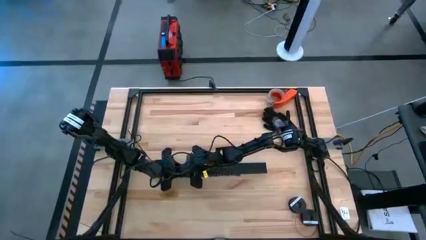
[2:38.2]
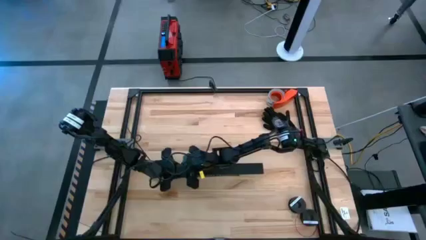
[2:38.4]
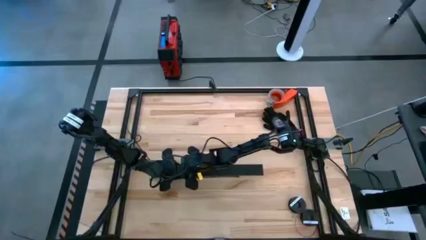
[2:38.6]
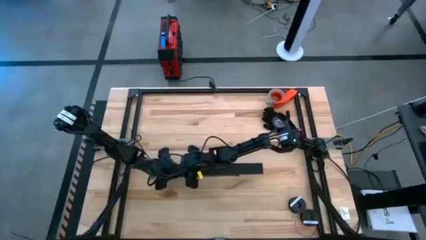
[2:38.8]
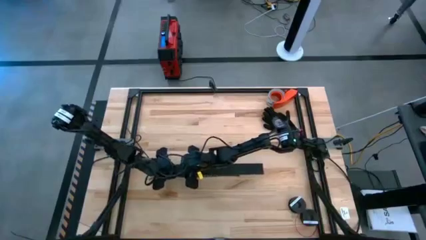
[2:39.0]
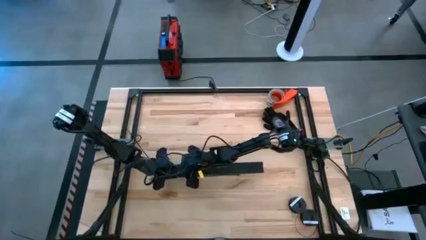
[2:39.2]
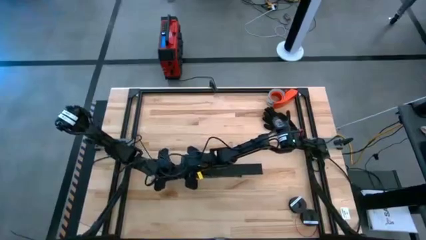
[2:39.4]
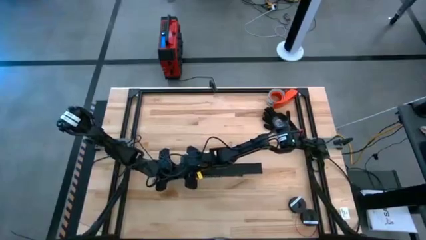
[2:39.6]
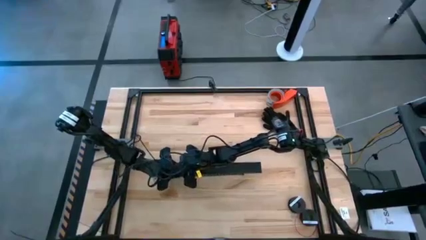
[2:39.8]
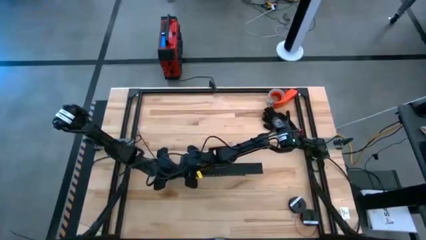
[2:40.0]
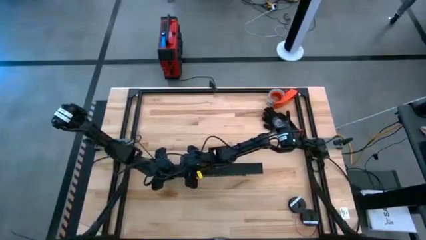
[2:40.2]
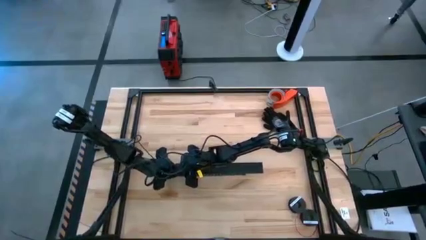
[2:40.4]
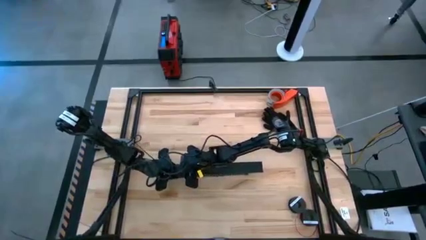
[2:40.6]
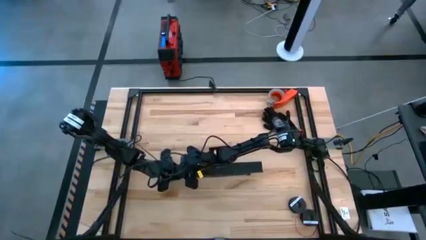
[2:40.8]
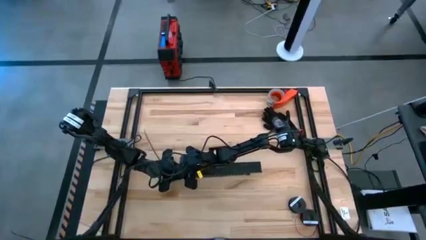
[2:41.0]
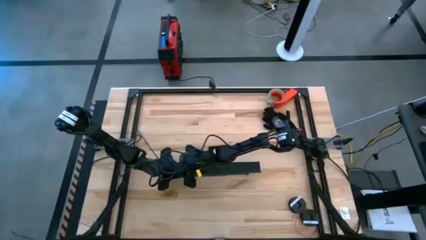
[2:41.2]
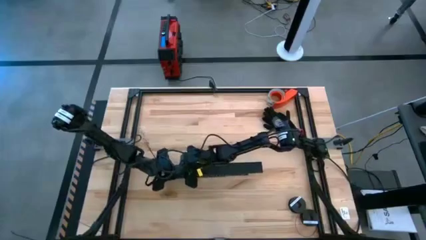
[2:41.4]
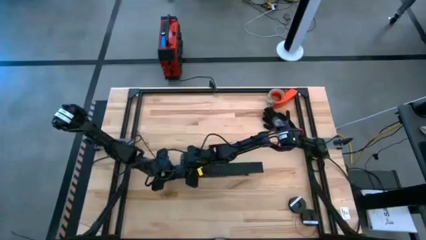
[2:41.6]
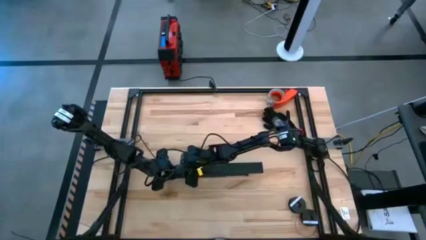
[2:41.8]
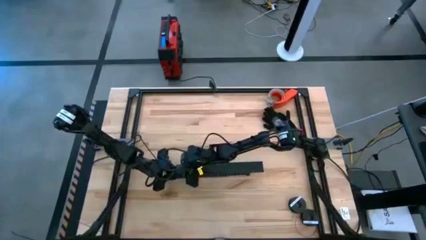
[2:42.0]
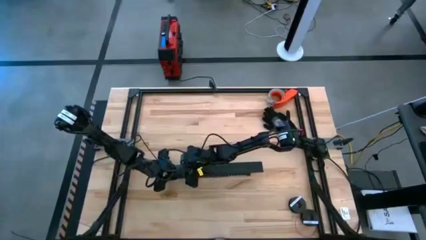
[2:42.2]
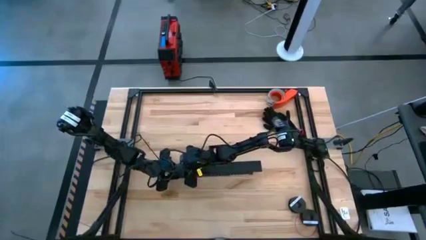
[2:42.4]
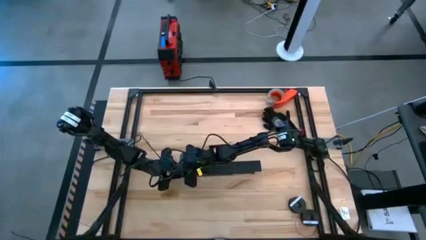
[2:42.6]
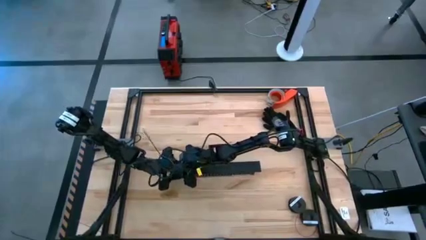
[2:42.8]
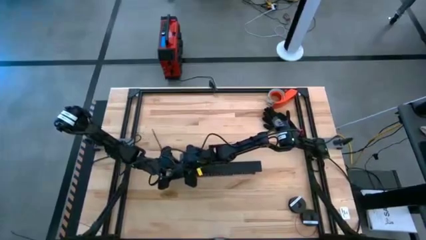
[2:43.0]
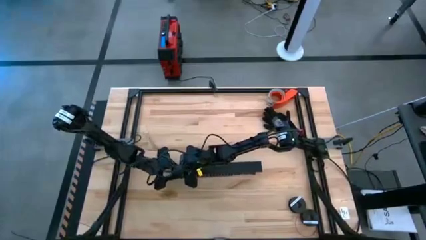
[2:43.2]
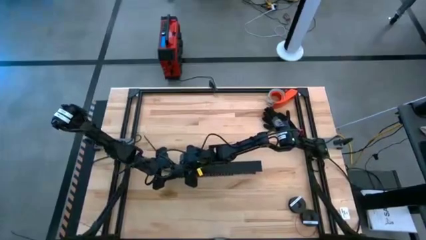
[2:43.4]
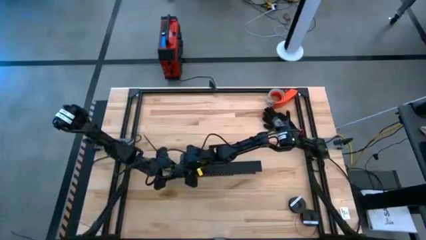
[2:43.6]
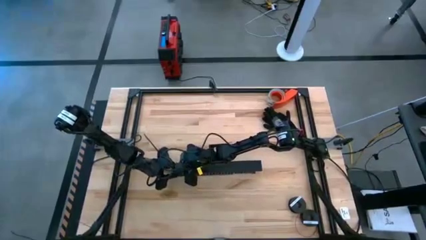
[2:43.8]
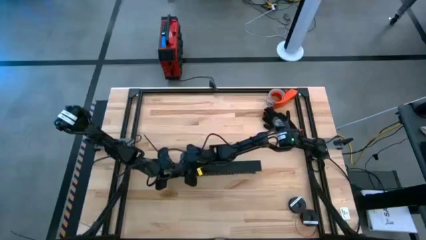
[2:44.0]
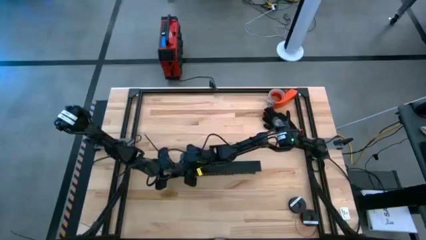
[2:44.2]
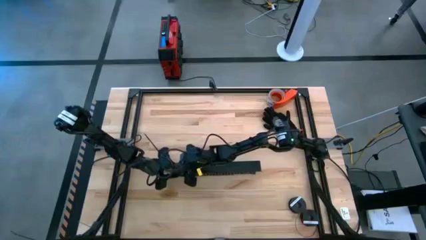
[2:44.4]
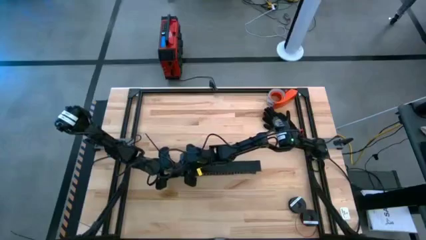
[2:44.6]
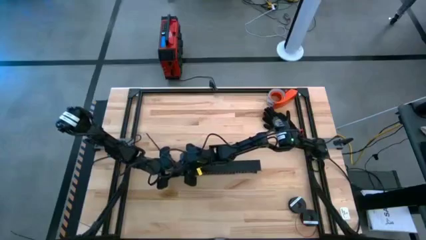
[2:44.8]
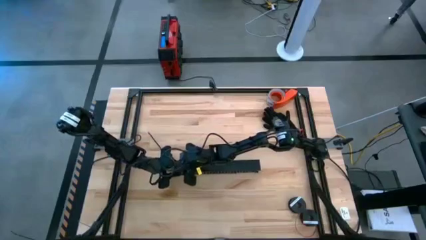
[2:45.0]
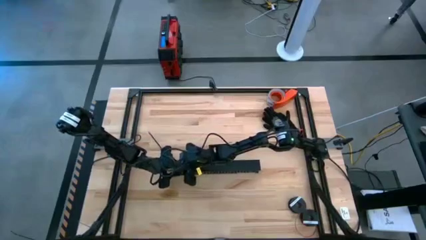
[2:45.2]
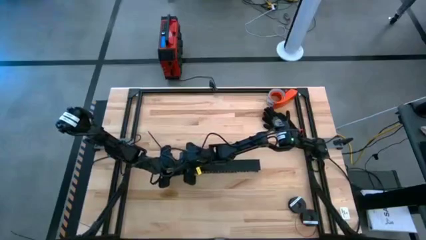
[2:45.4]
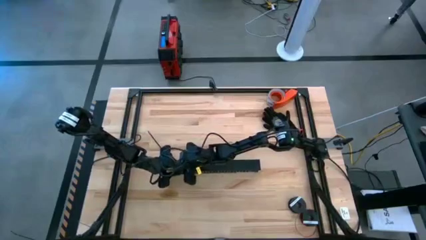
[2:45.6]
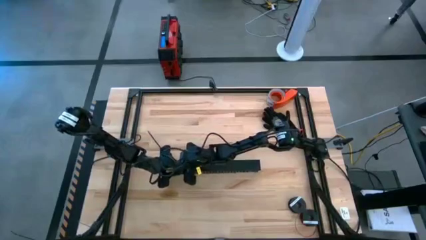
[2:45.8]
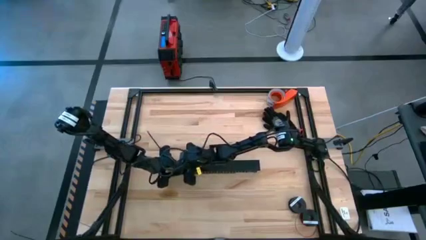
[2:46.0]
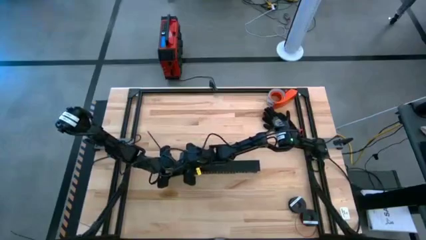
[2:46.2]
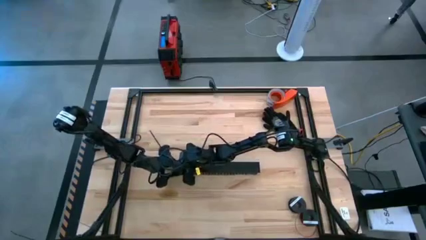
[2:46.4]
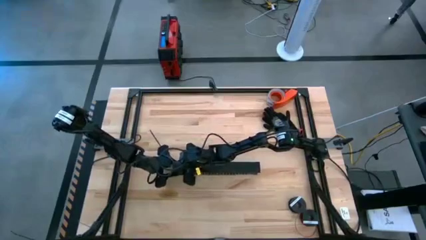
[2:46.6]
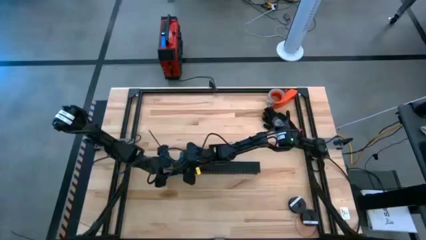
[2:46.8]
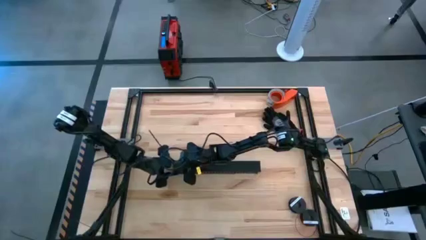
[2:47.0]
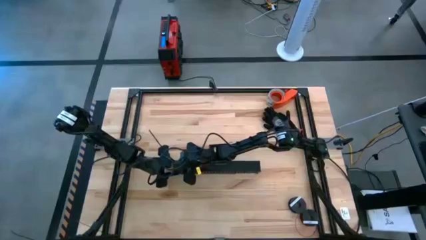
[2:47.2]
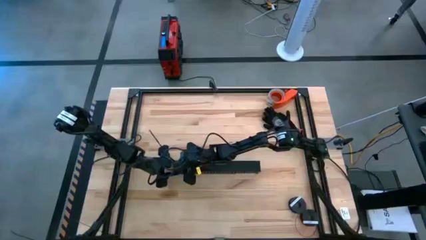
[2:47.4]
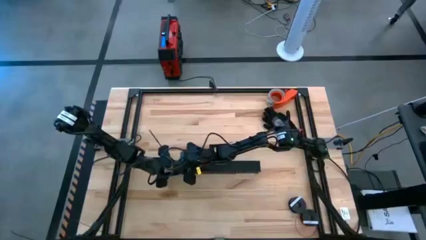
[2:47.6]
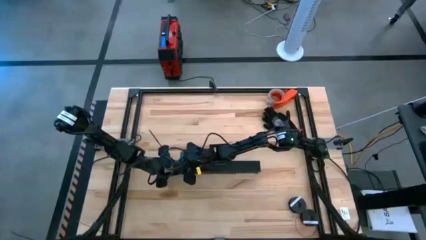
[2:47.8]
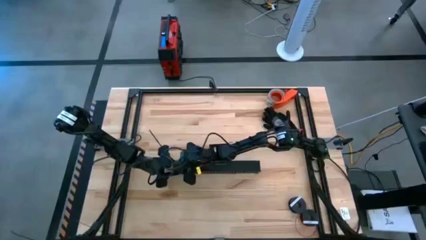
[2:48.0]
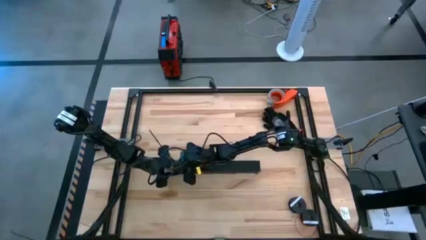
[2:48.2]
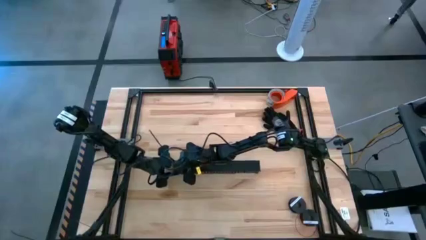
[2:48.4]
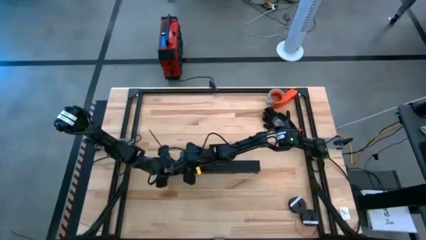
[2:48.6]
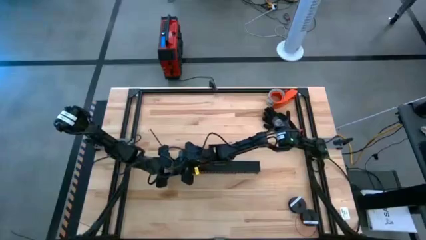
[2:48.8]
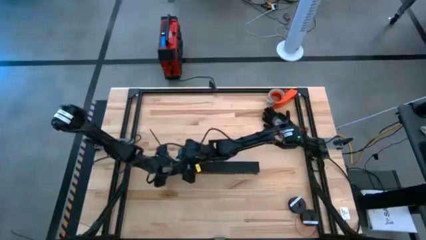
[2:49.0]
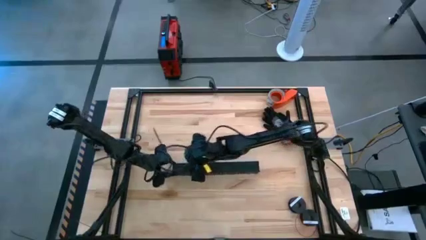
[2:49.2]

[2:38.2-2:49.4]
Task: Ziptie cables
Close the black cable duct

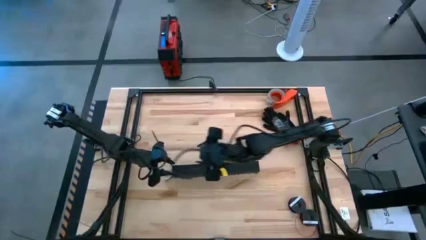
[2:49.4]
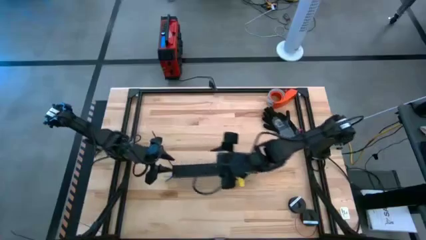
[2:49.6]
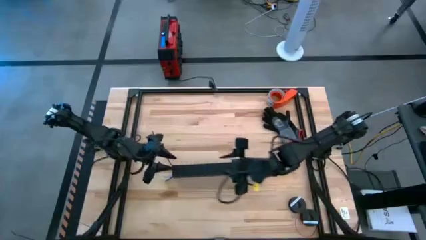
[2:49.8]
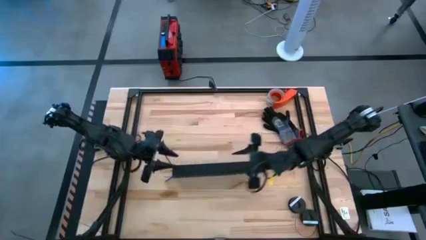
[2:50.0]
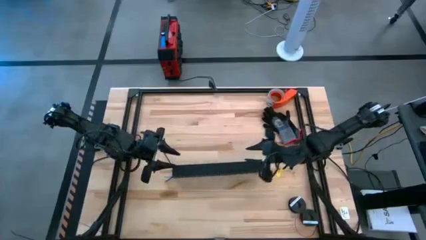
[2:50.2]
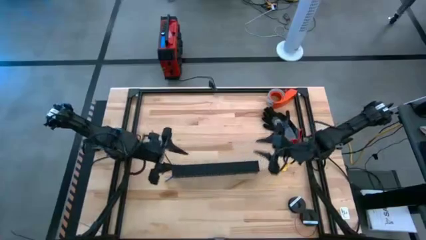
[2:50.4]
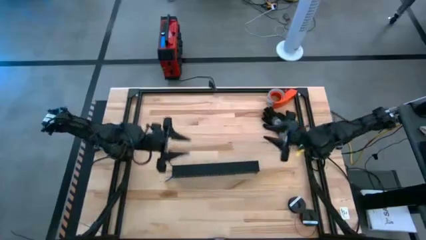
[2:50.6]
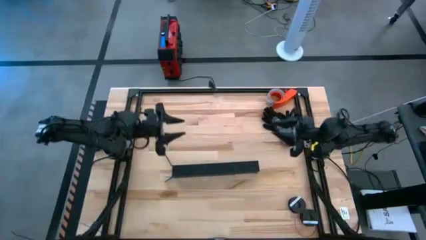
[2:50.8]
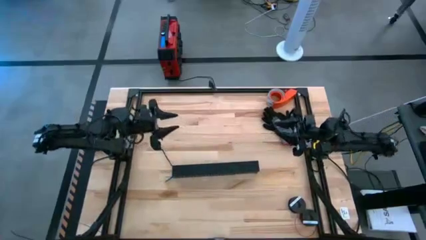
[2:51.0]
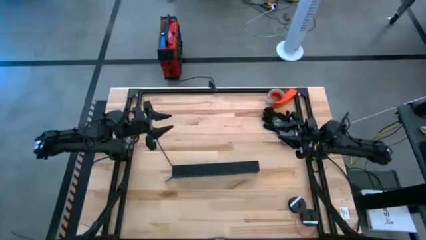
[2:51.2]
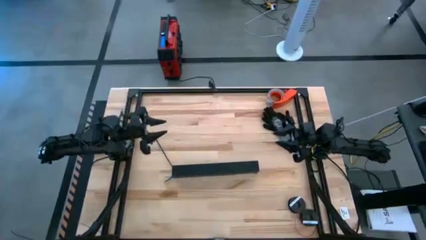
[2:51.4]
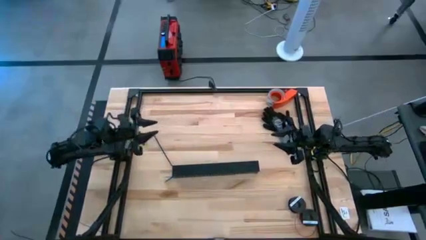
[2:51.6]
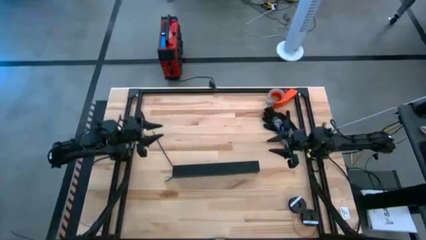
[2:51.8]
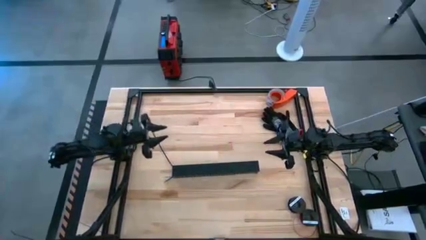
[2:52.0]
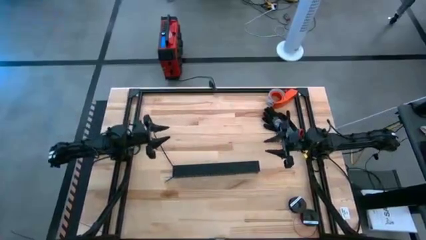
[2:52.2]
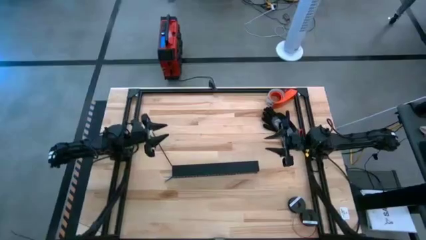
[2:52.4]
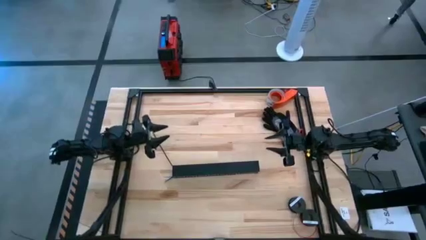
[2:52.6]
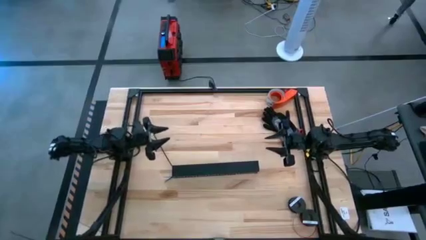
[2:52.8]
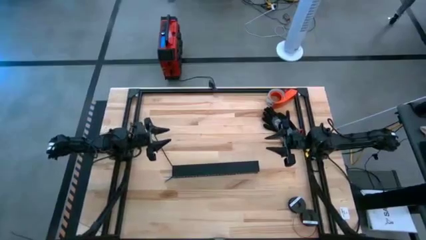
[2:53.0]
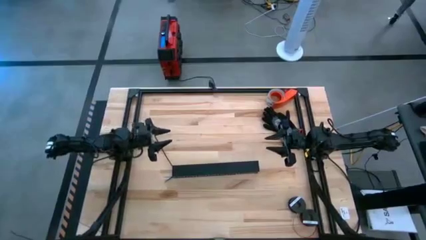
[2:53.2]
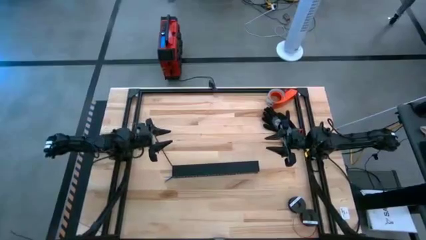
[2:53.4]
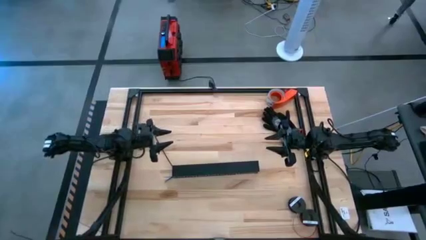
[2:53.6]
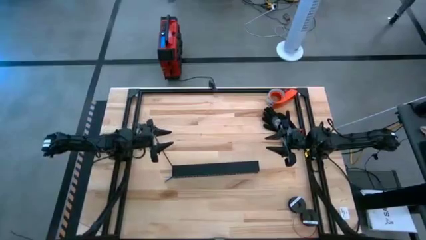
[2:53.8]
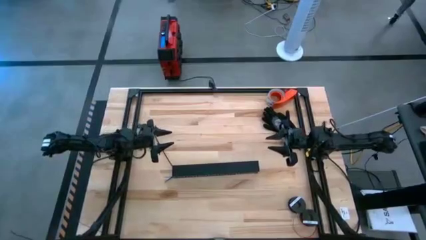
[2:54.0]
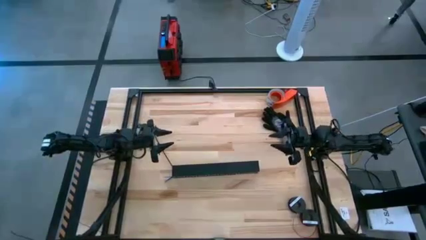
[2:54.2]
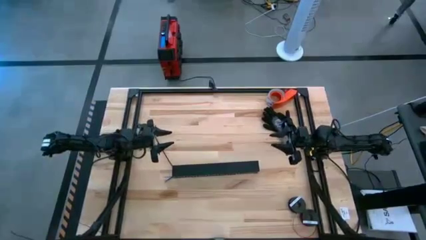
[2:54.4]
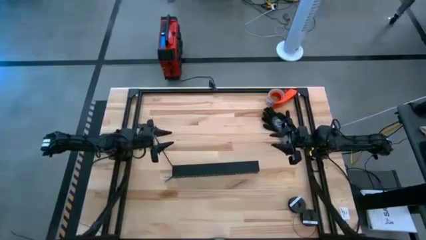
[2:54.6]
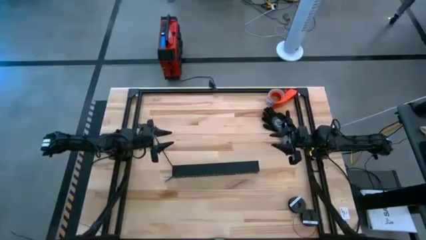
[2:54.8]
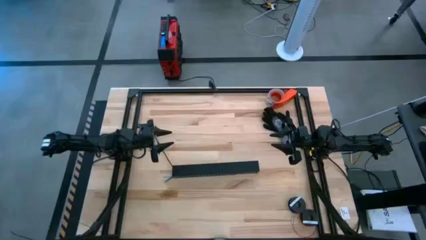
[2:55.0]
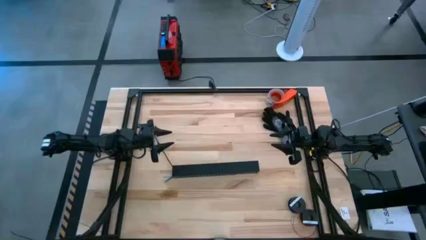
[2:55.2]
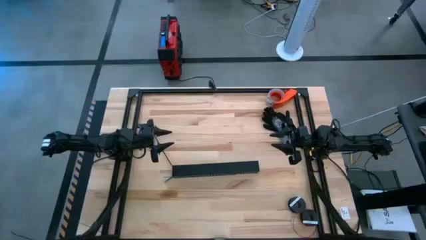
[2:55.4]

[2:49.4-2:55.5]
Return to Home Position
